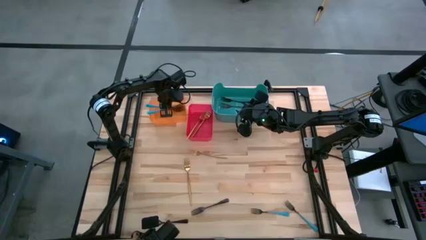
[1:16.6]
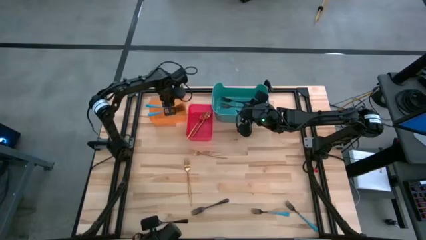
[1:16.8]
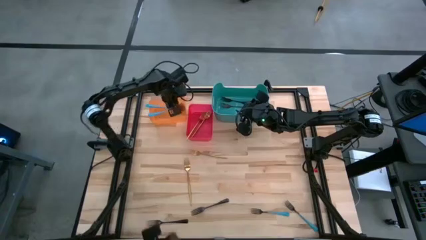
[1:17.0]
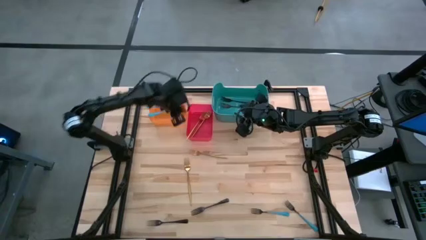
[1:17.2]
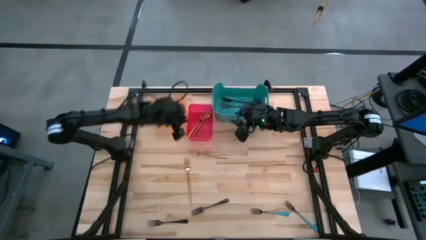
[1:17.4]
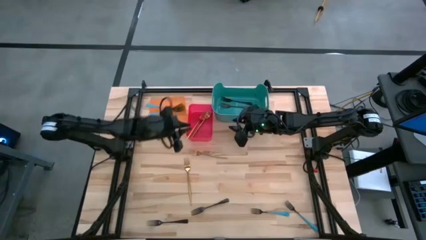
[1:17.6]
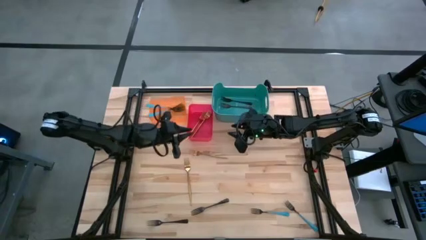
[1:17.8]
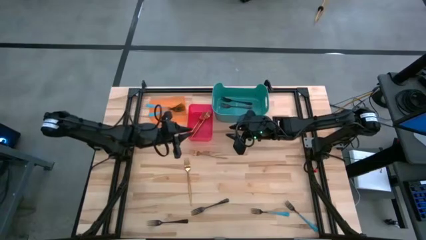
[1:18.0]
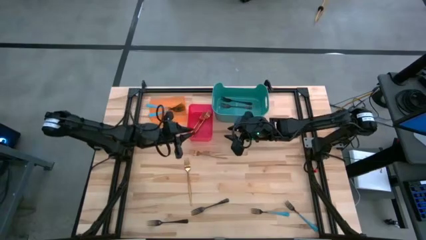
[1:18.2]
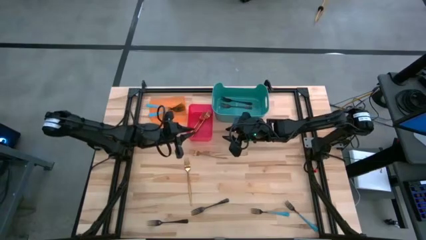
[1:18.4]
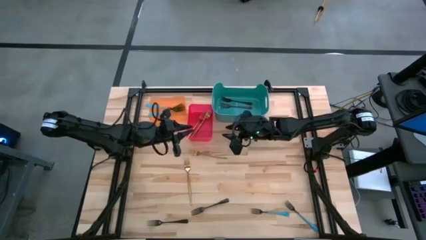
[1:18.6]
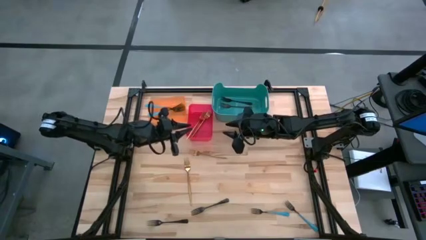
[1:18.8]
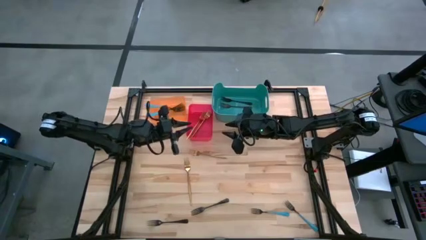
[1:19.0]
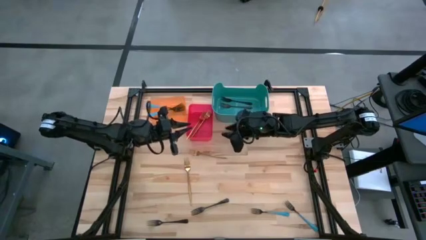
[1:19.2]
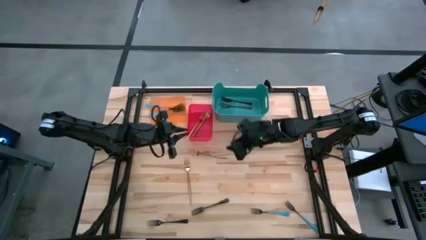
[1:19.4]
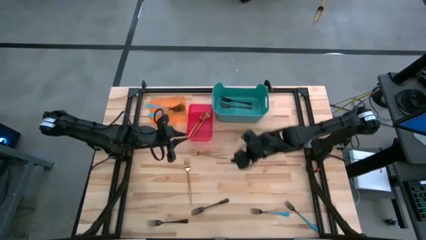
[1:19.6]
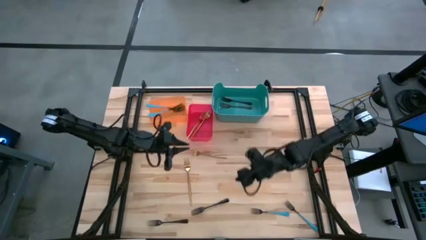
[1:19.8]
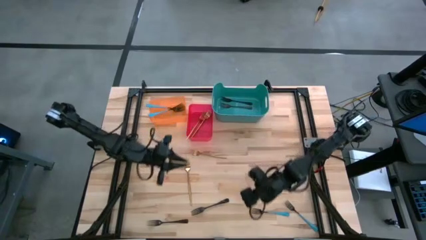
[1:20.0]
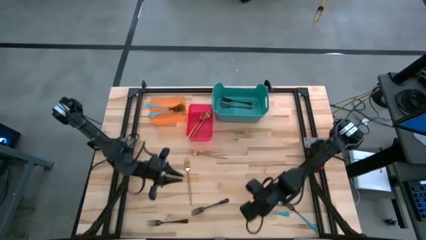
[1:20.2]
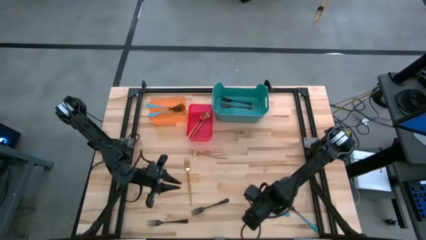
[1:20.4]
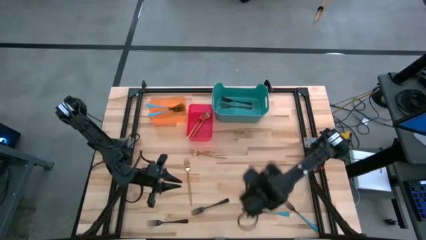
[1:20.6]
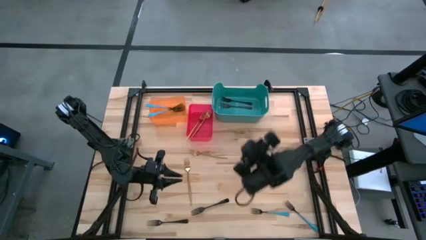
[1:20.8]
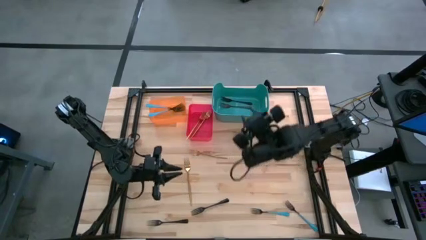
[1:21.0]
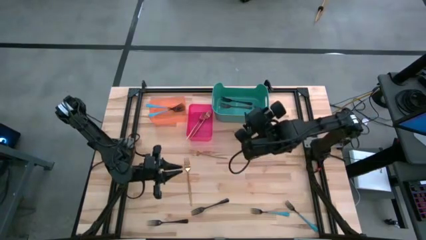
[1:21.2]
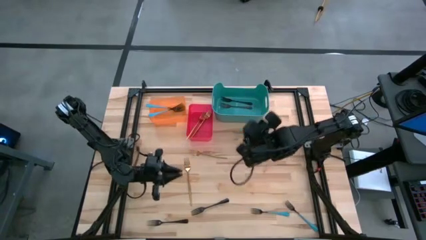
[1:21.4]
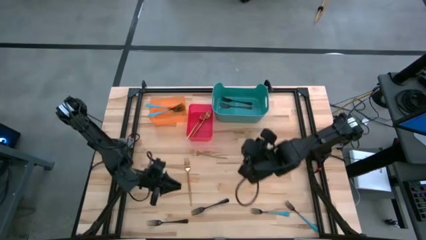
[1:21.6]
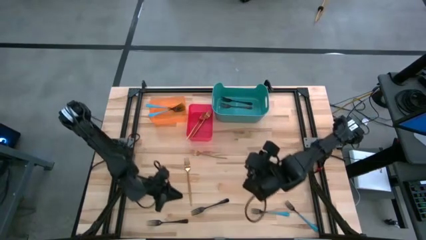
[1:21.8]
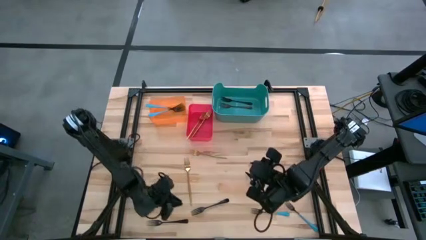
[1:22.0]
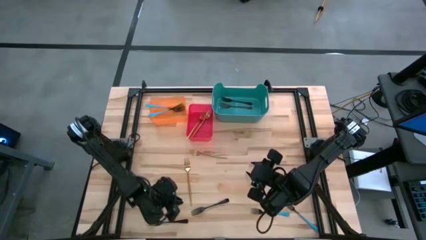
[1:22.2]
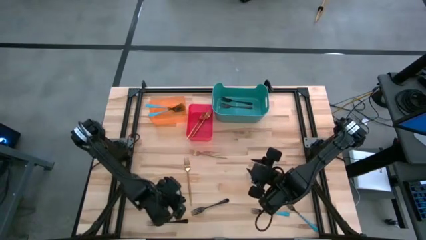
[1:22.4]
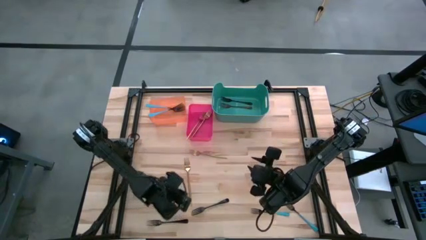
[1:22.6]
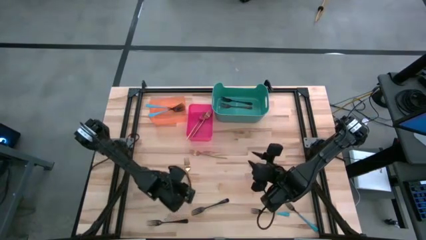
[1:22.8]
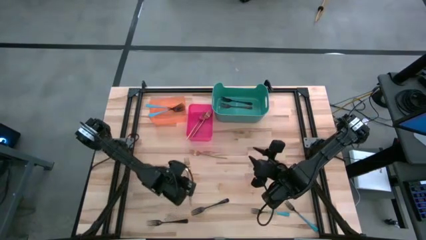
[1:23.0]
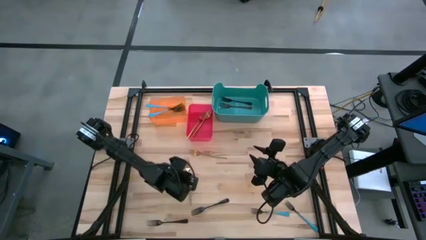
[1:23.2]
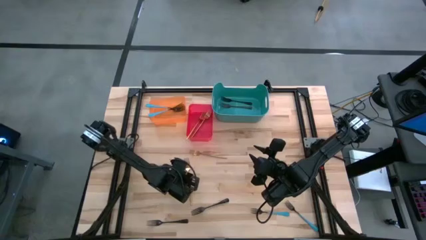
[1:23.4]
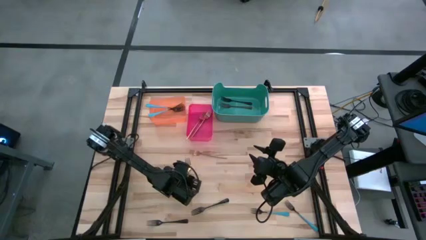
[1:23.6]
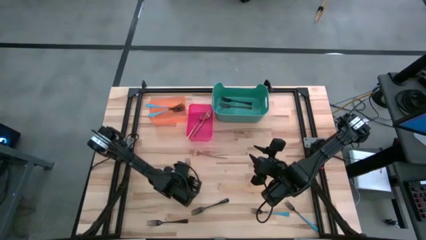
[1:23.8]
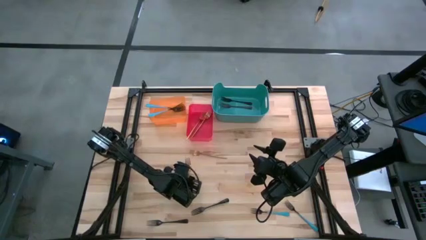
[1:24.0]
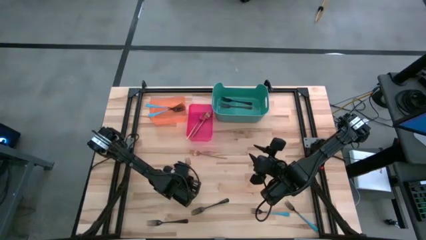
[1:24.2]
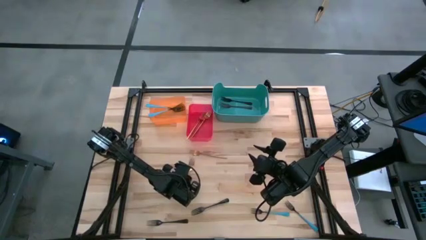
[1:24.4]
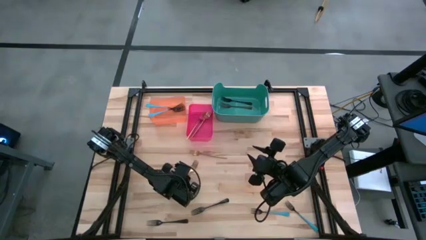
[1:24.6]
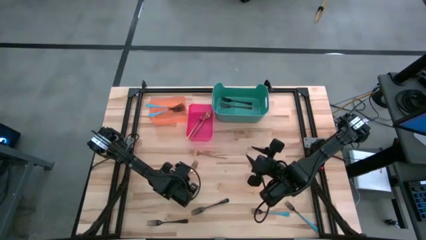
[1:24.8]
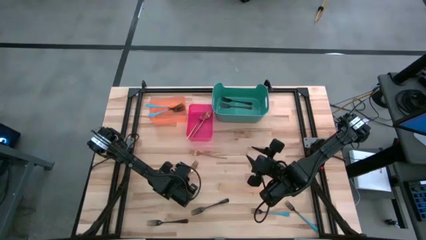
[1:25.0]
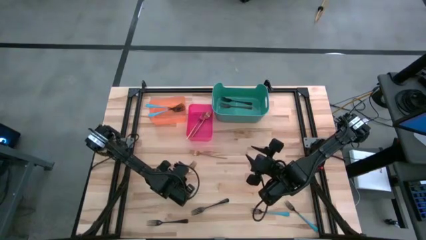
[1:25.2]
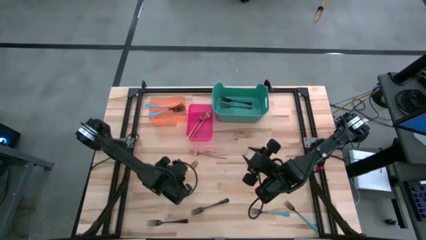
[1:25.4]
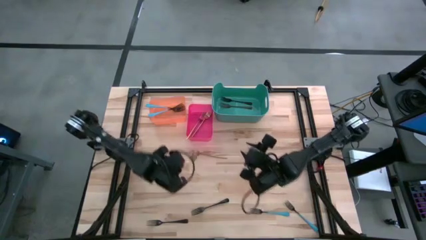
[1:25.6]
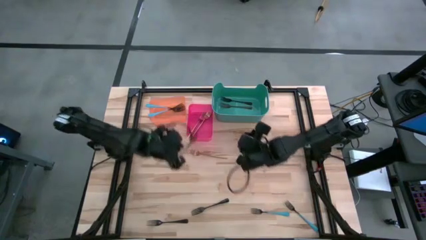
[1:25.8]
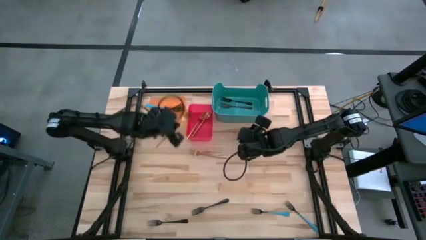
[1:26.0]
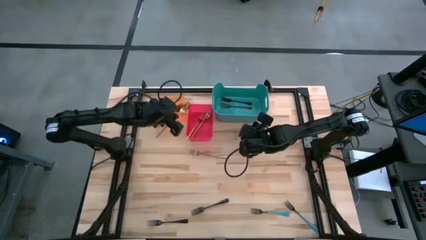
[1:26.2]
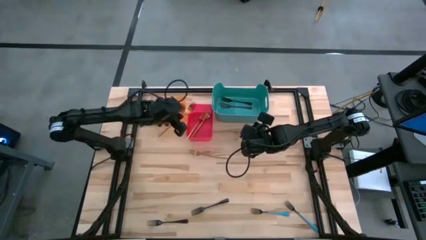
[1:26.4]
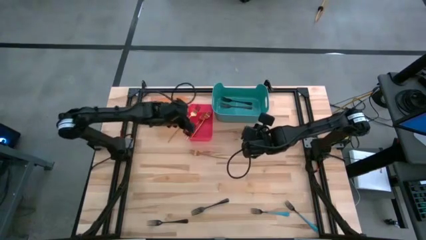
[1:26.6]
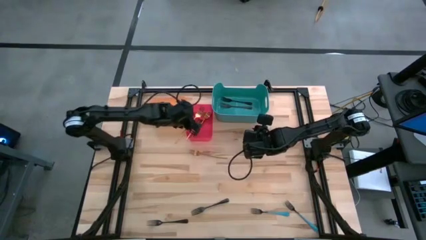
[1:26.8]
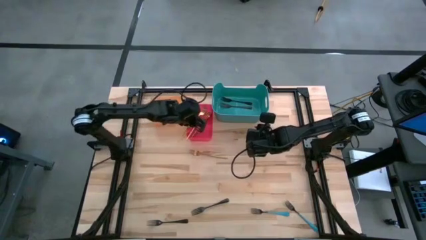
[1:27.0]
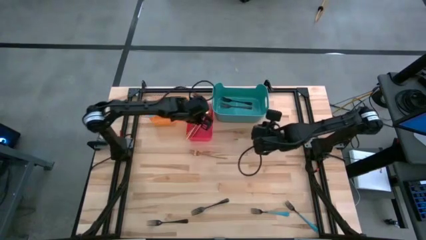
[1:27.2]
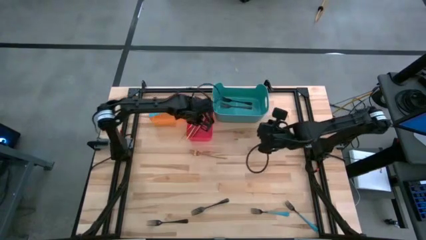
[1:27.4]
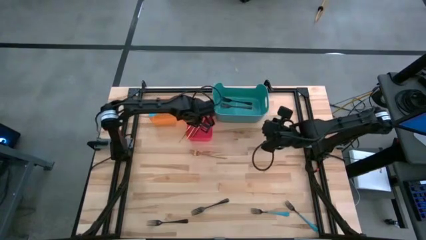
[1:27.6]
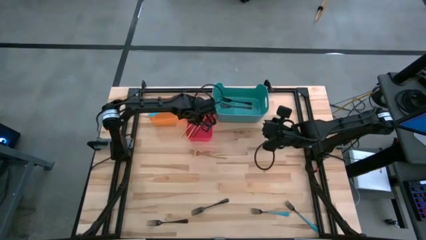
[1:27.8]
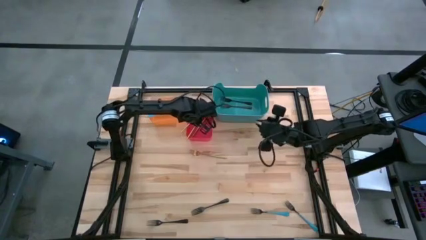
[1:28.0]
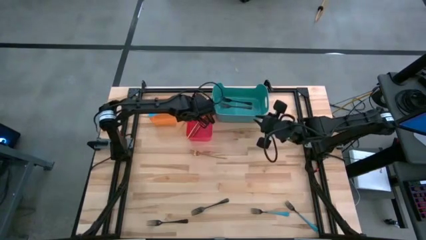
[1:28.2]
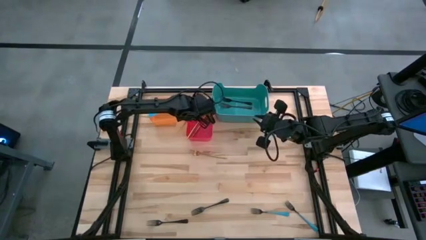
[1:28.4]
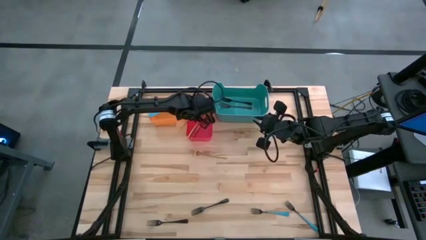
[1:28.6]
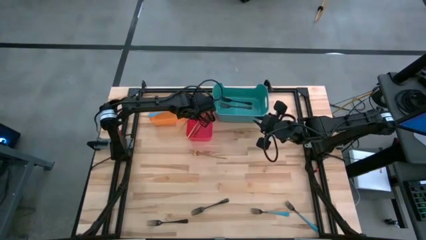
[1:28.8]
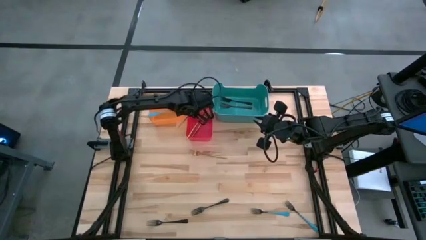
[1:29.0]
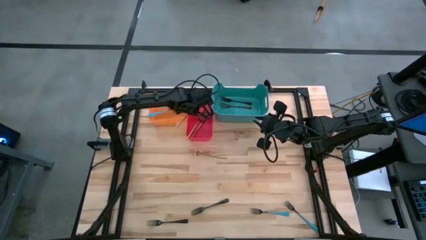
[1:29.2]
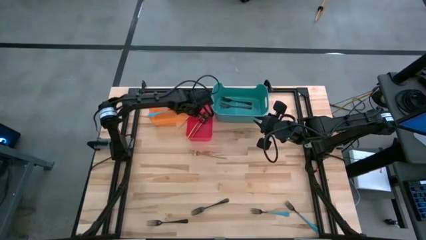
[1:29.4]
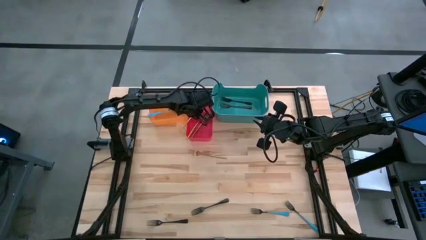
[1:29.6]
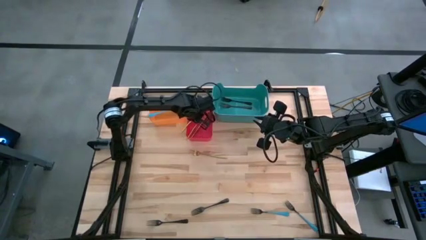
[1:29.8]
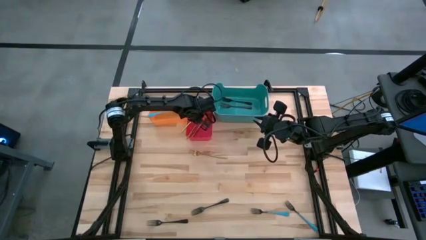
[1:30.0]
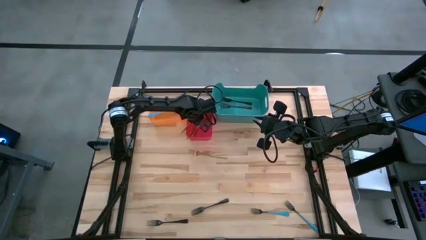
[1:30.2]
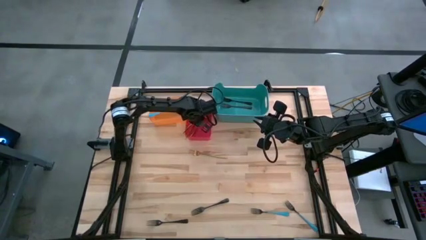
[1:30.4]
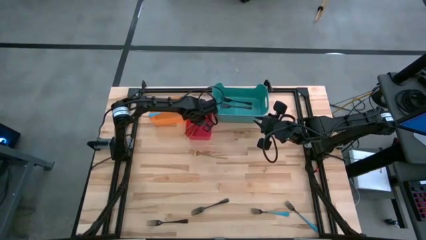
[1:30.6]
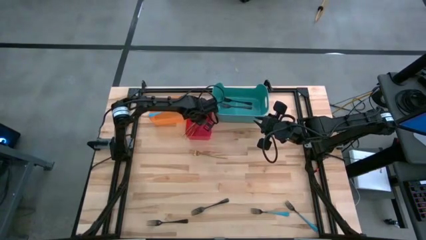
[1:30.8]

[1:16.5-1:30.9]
Task: Sort silverware by color (type)
Put the gold fork into the red bin
